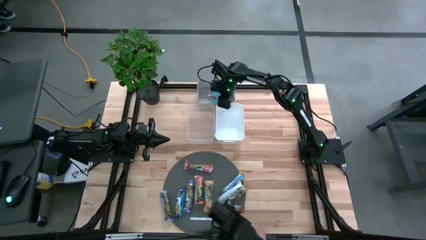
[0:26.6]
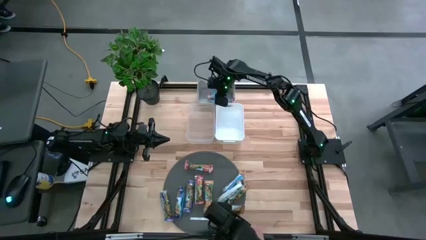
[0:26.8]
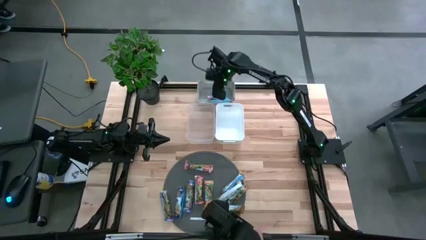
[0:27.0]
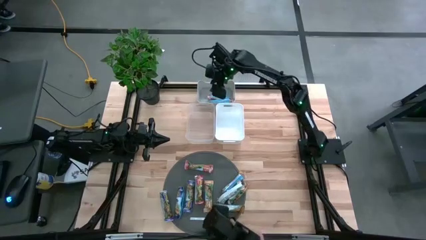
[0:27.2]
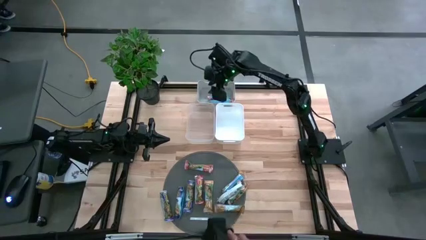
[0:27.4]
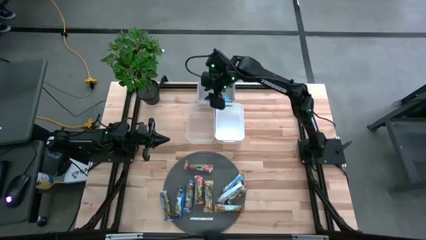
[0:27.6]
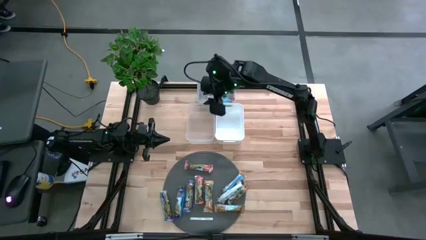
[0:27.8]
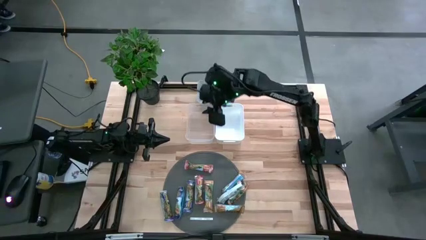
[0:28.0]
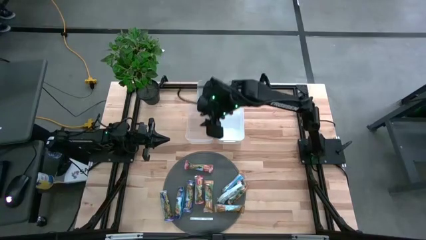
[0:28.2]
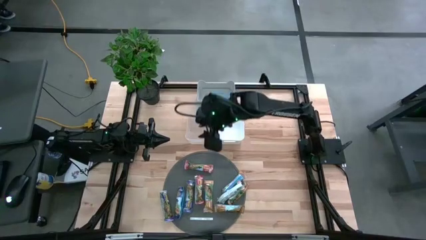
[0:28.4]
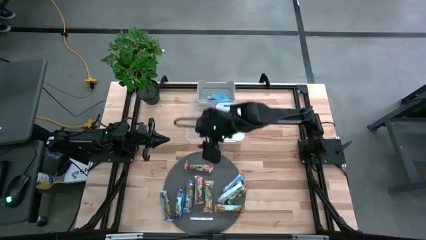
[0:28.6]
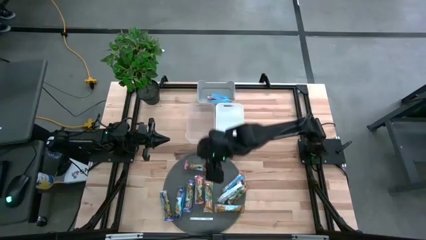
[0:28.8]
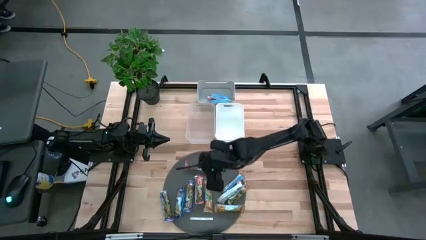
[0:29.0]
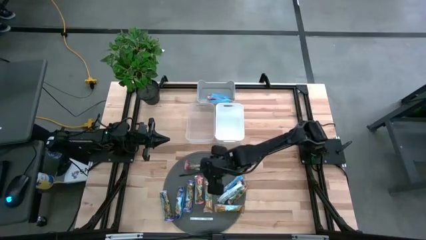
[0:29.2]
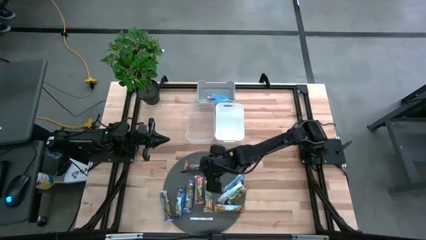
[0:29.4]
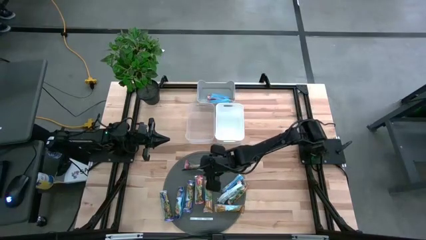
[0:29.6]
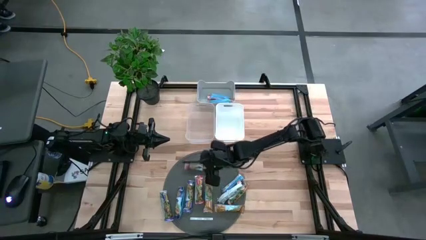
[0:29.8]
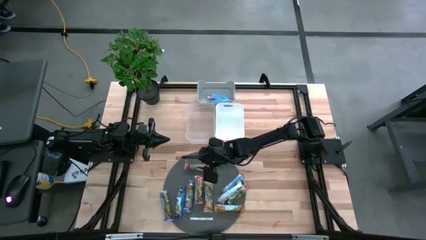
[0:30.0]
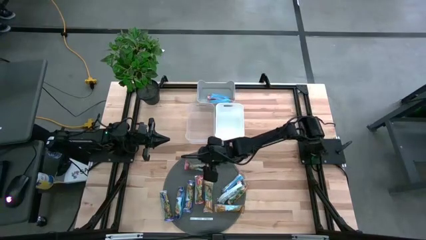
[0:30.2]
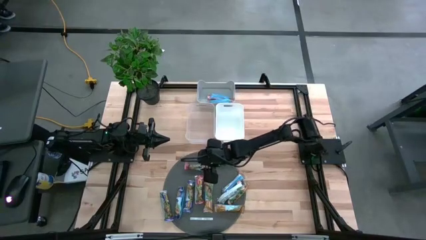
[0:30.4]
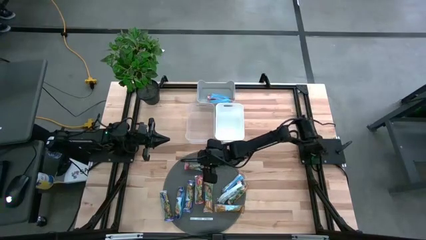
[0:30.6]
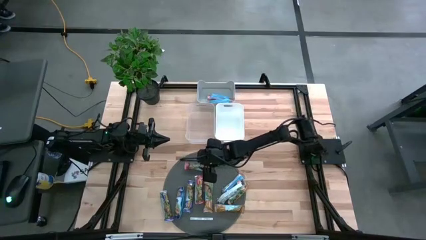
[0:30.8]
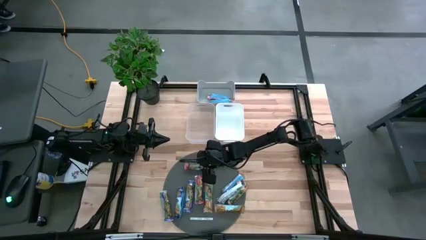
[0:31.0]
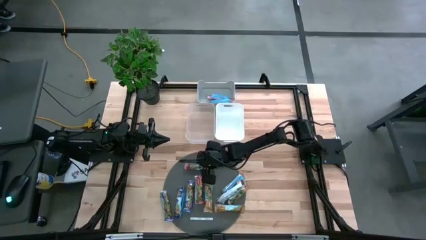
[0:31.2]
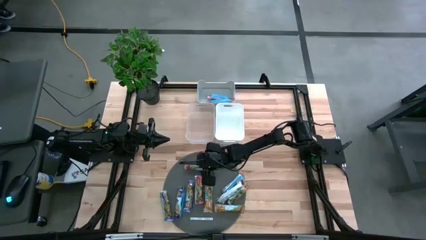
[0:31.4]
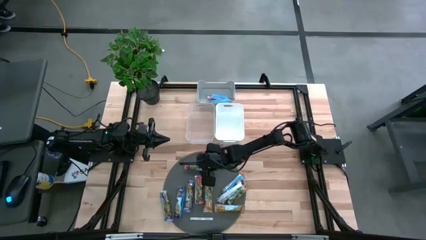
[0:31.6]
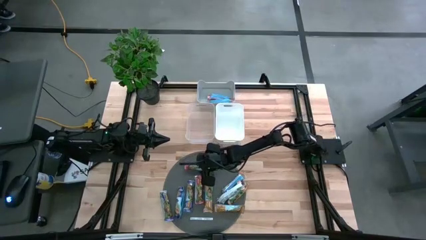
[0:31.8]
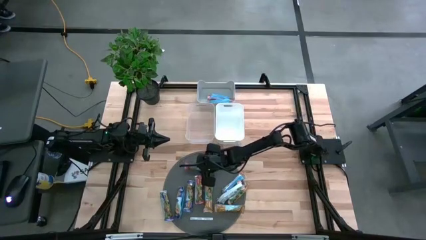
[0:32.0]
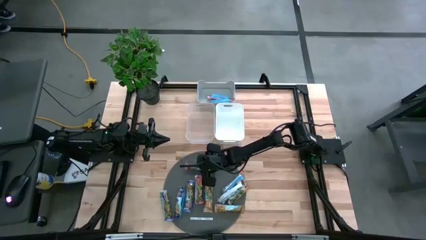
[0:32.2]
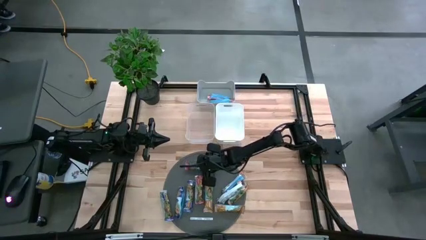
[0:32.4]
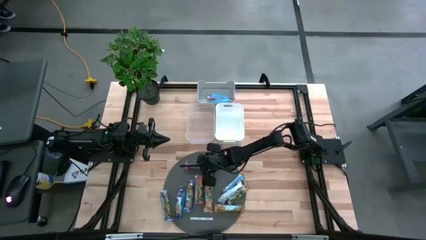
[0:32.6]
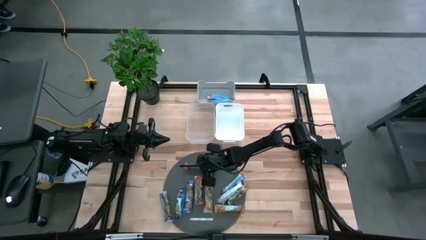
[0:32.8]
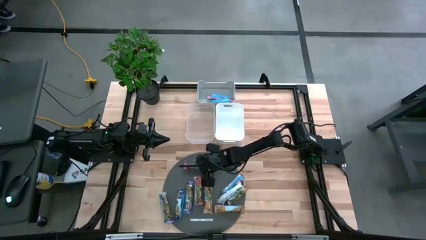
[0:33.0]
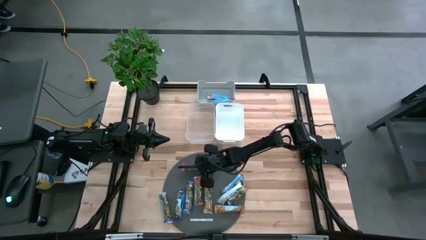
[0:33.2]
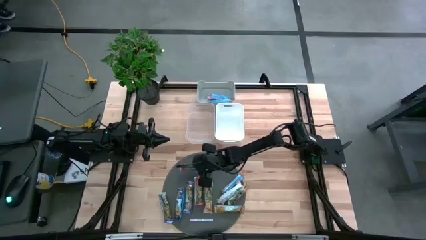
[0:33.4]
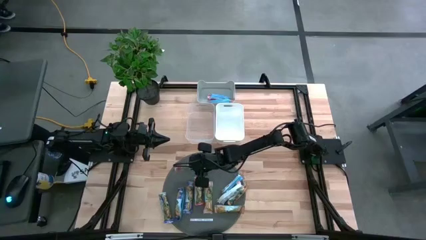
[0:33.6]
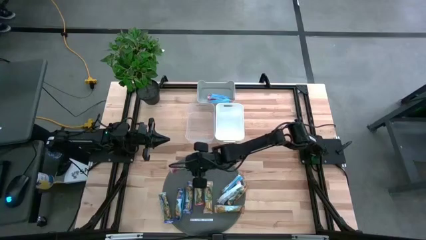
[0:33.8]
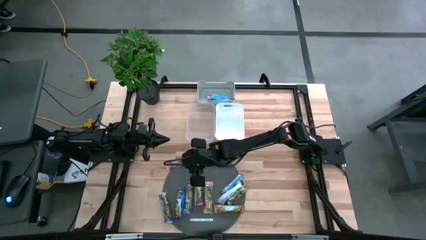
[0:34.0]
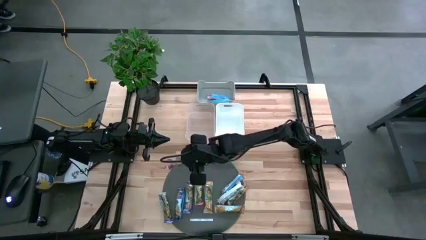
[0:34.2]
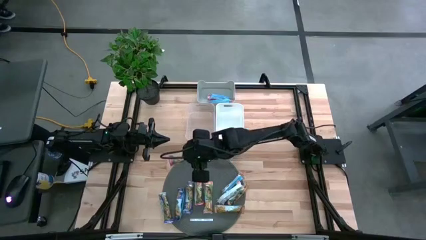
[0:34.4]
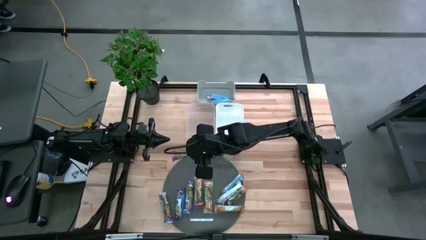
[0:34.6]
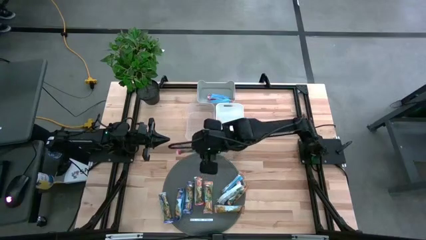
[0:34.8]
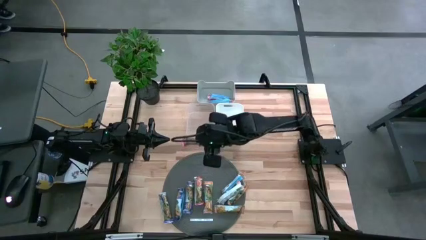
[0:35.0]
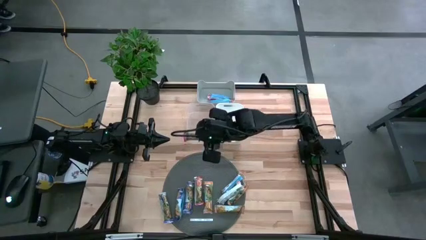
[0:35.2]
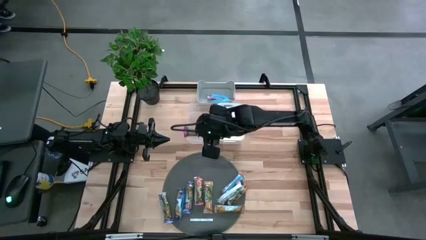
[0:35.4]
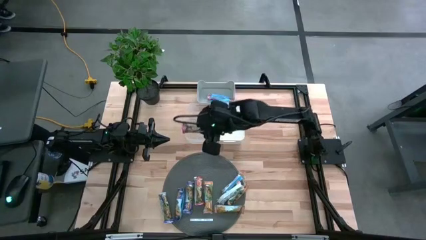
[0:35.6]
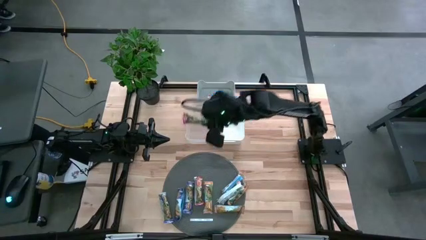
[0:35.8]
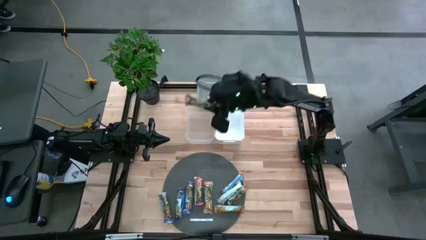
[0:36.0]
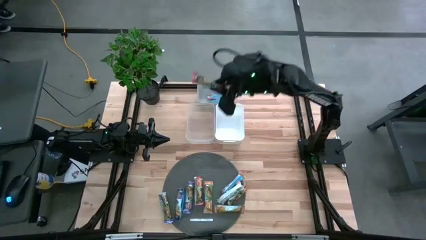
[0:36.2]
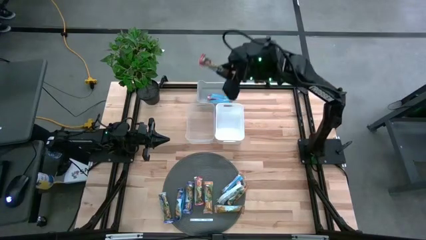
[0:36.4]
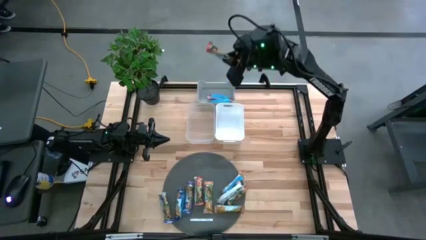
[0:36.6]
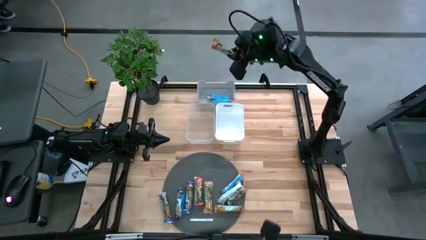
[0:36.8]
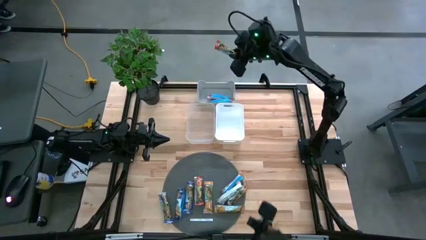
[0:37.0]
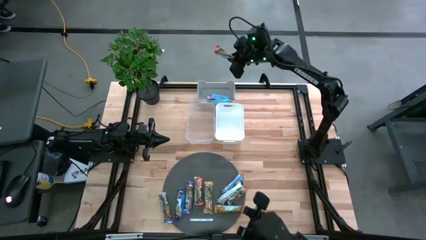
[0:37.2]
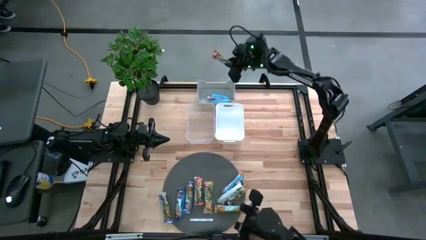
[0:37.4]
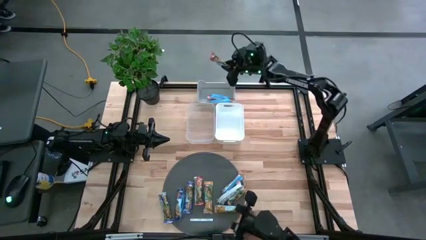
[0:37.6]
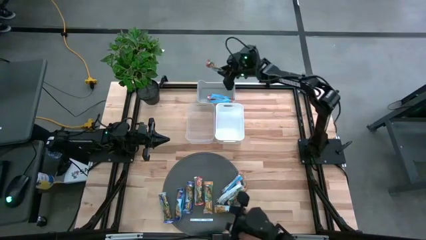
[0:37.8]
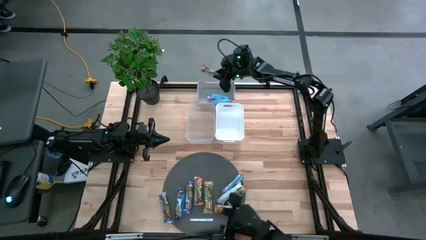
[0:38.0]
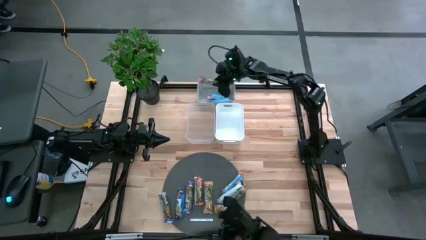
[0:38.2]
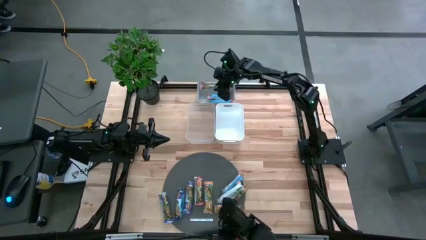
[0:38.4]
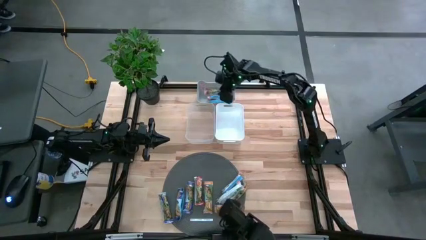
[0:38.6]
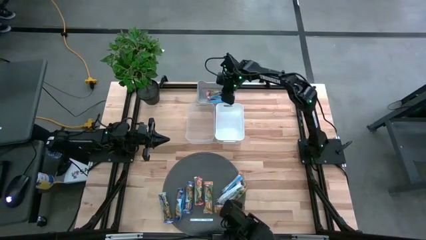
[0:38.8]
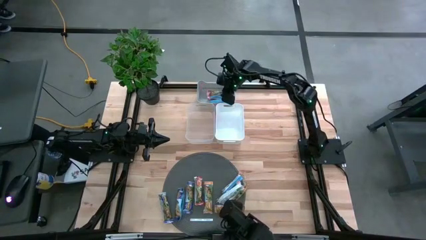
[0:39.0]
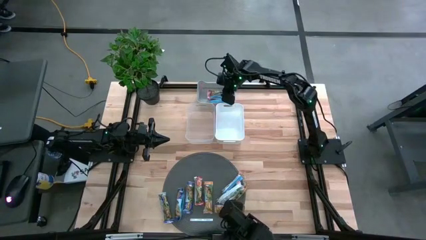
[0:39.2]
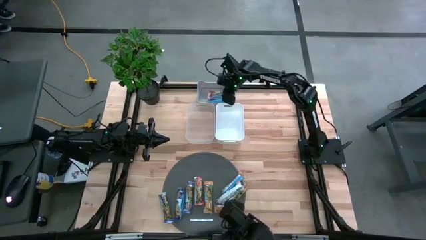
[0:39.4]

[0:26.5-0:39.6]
Task: Pick and place Granola Bars by type
Put the red granola bar into the gray bin
